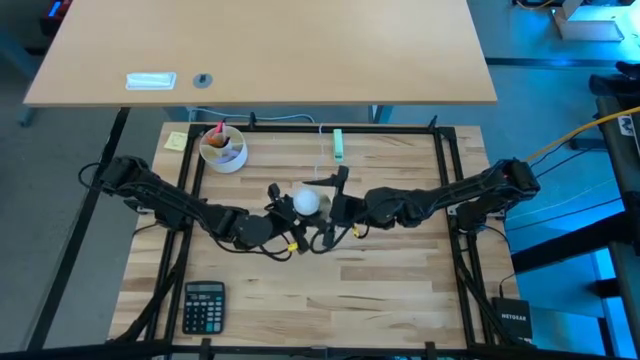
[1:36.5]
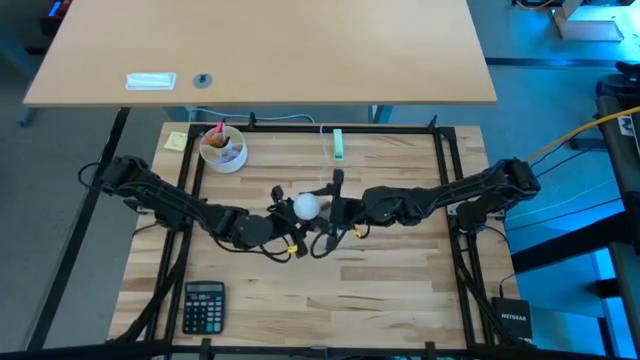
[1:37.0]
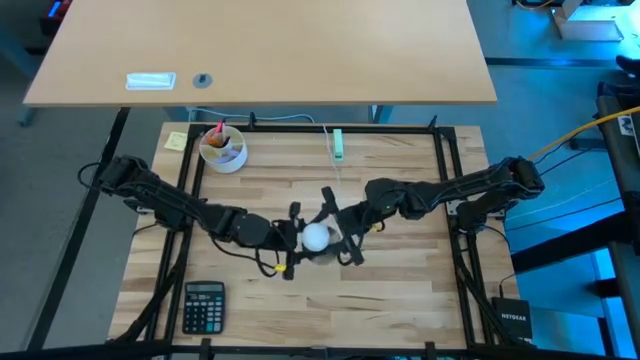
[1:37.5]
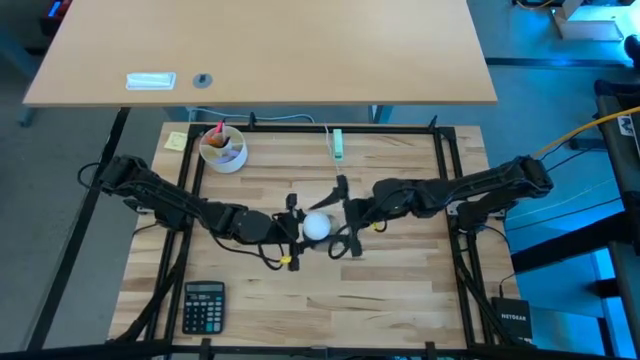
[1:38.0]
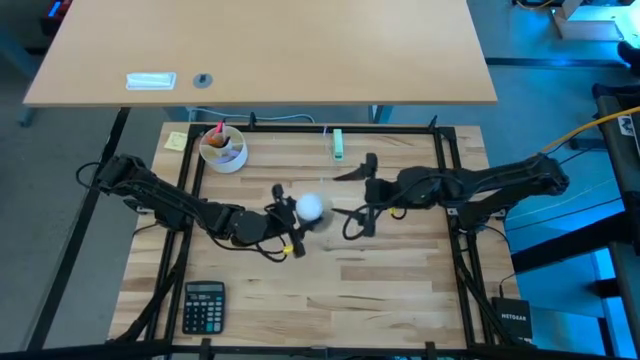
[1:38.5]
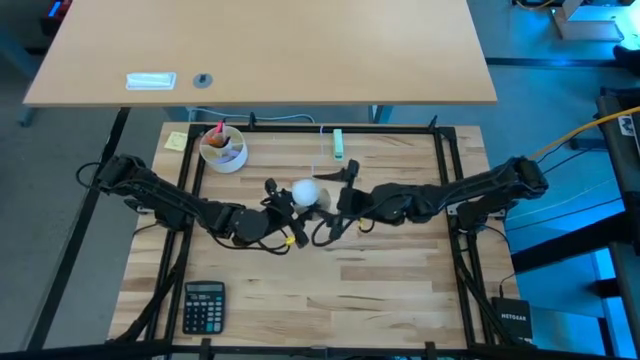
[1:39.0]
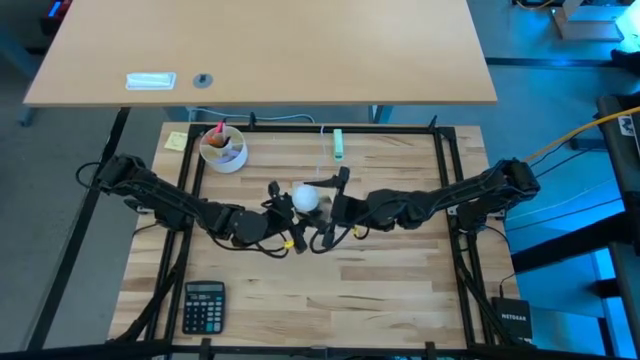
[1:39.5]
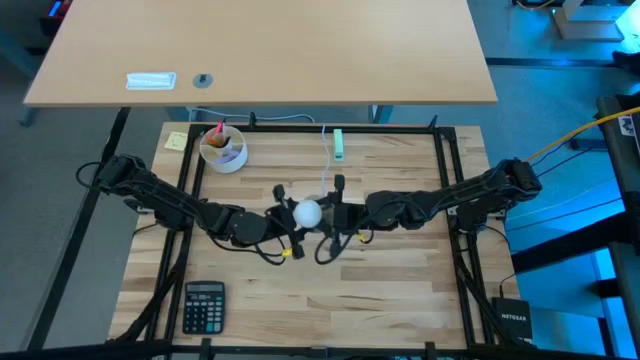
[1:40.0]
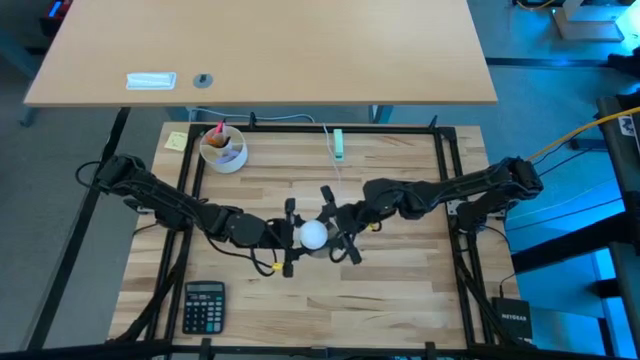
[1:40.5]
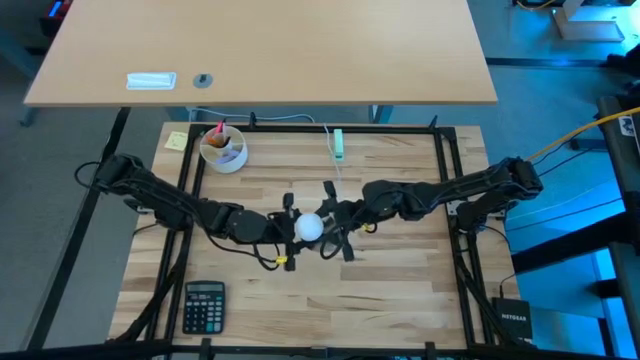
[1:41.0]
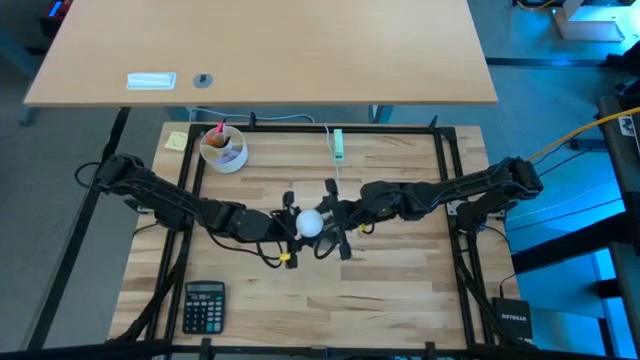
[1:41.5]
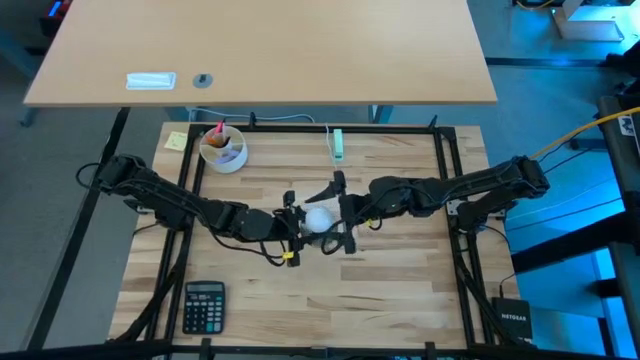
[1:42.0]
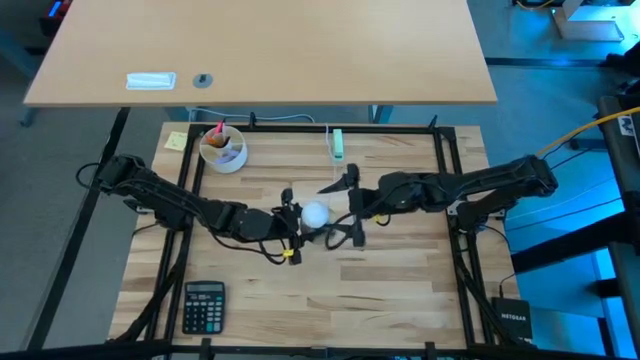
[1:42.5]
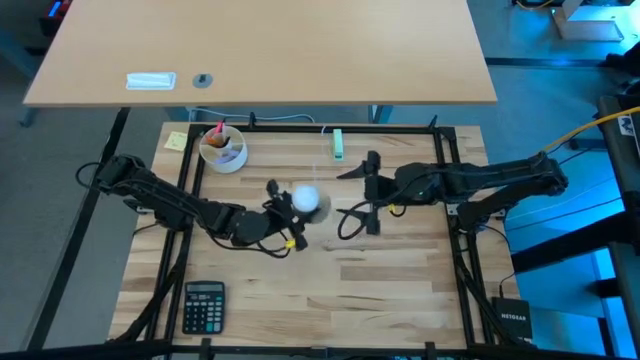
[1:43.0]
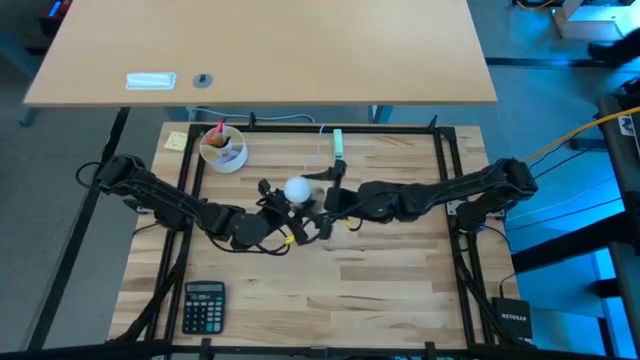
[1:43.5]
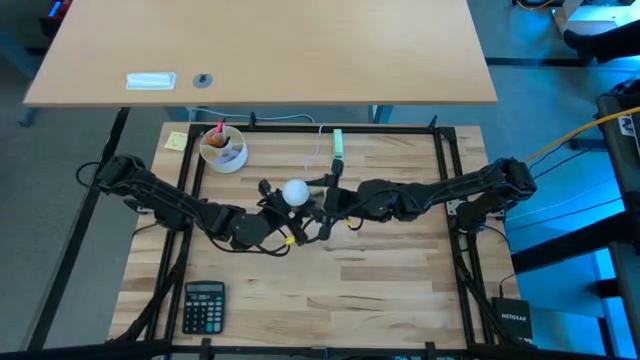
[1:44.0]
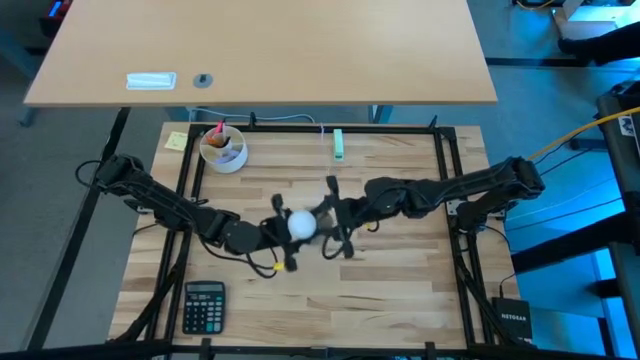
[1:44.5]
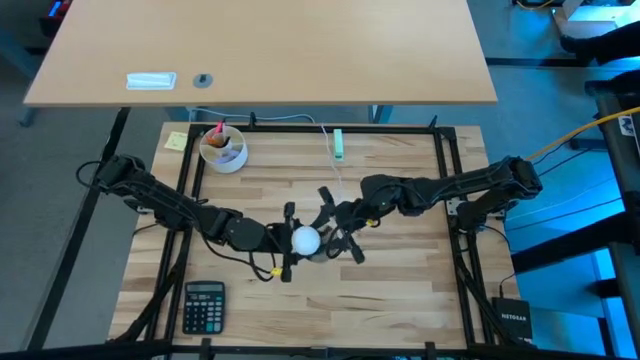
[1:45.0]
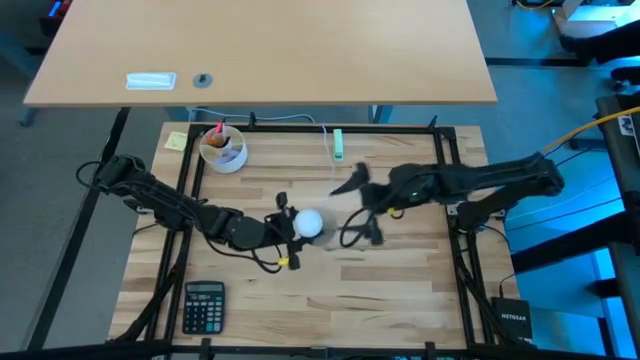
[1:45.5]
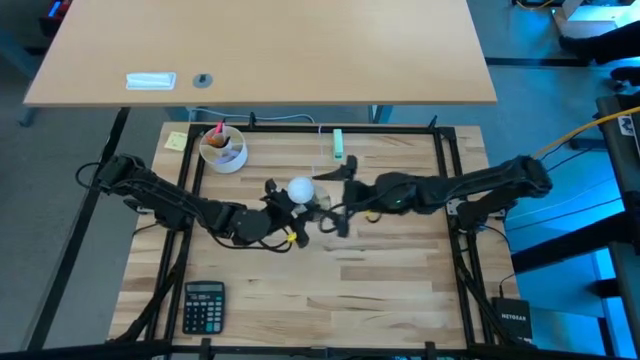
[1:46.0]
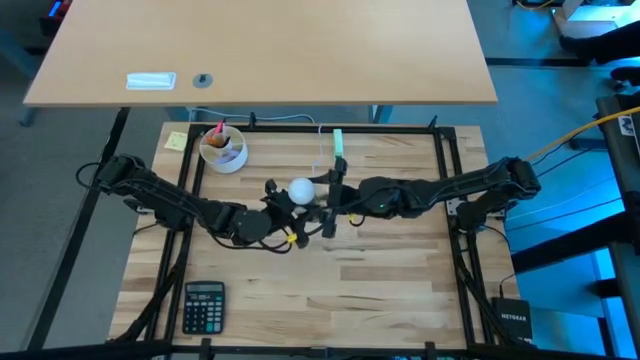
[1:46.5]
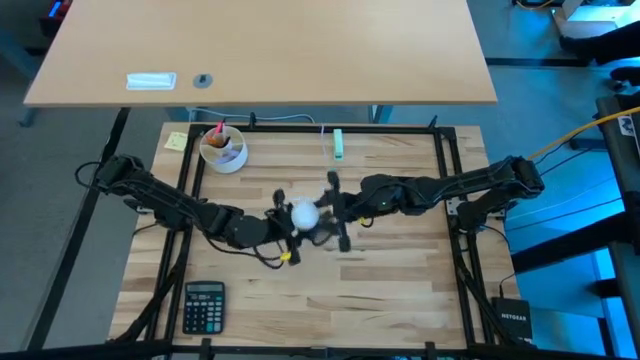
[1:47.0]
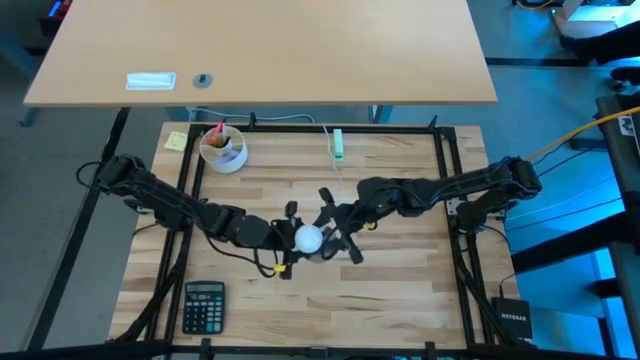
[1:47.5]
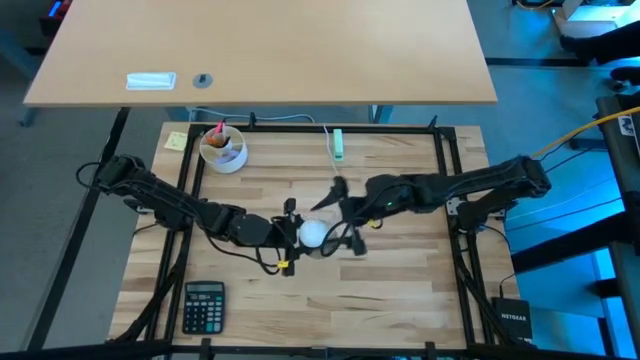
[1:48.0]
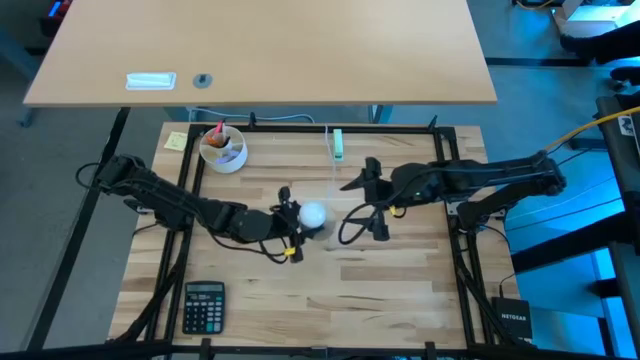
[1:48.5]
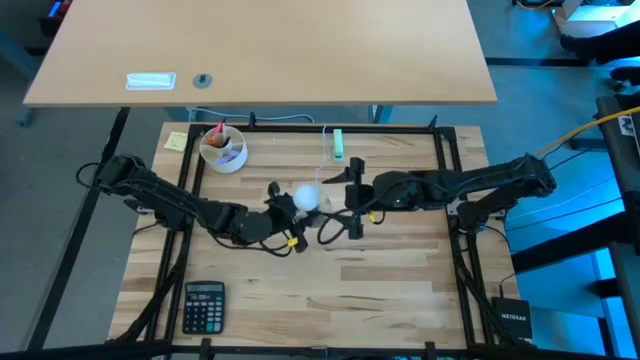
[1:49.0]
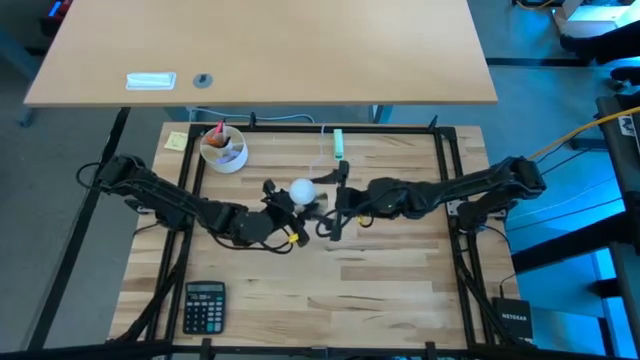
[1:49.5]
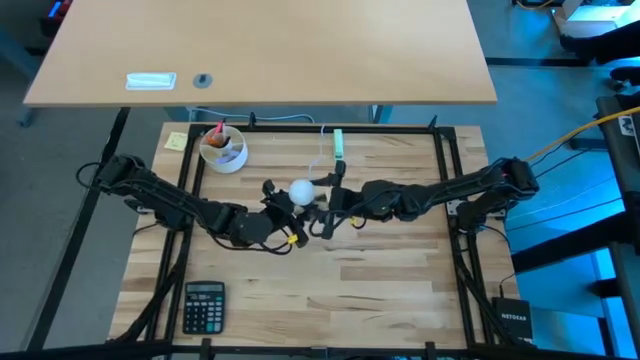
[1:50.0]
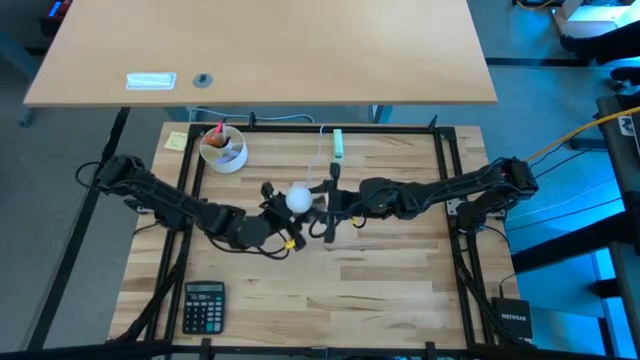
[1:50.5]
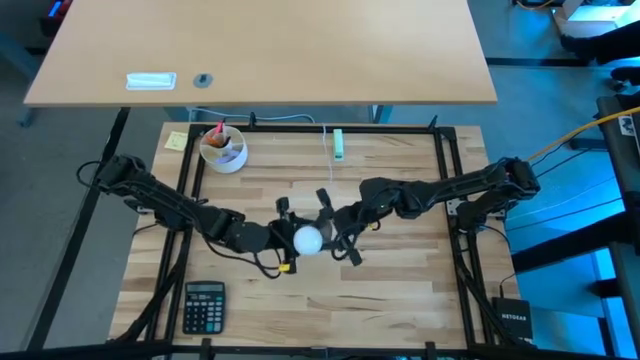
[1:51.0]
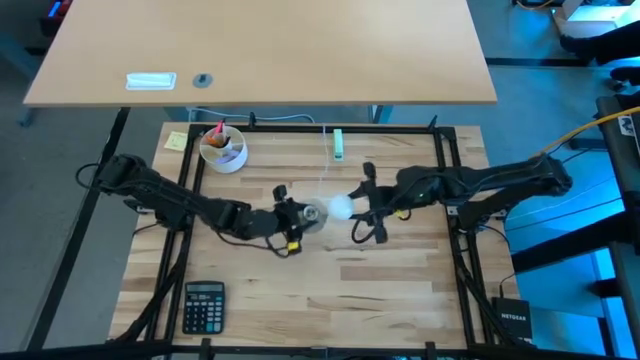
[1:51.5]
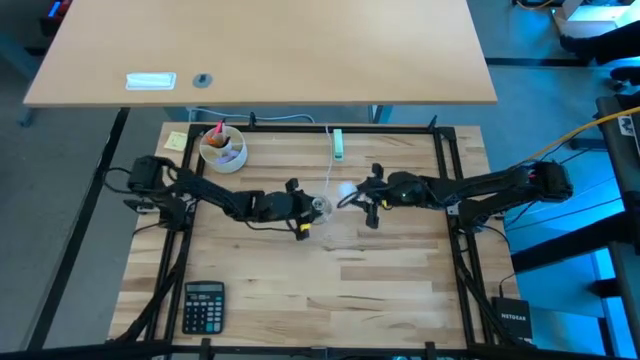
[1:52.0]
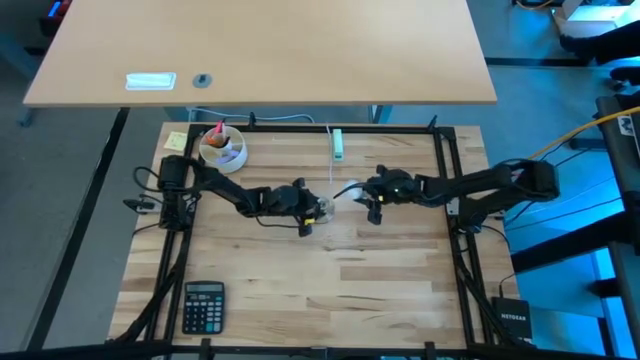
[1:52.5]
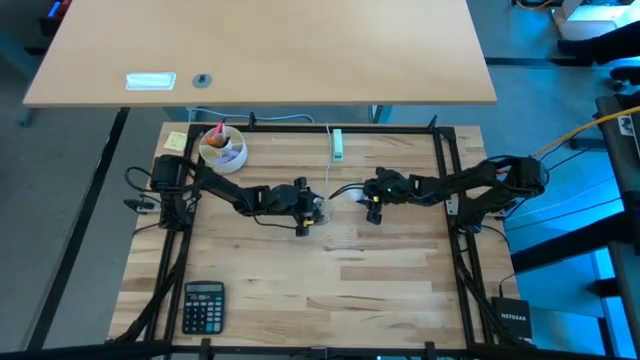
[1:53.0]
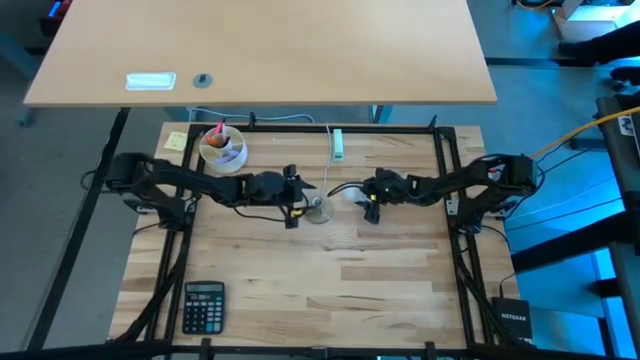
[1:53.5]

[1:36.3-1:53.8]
Task: Screw lightbulb
Remove the lightbulb from the lamp socket

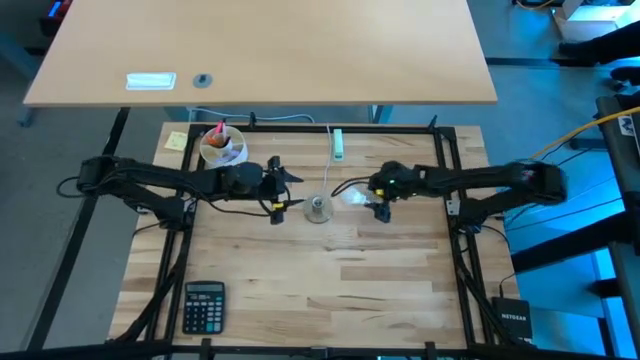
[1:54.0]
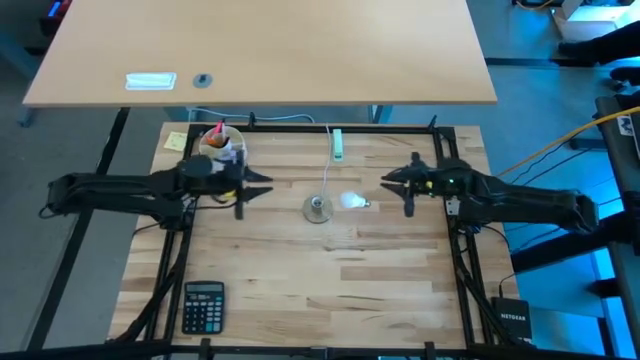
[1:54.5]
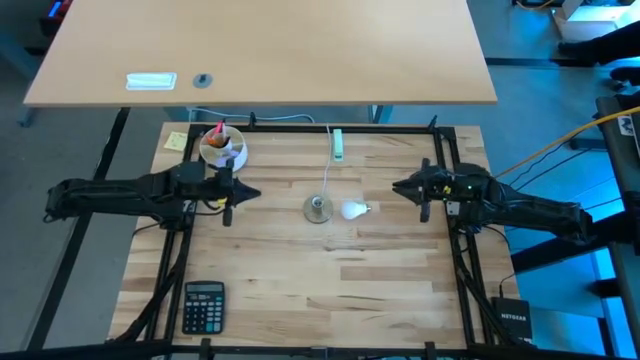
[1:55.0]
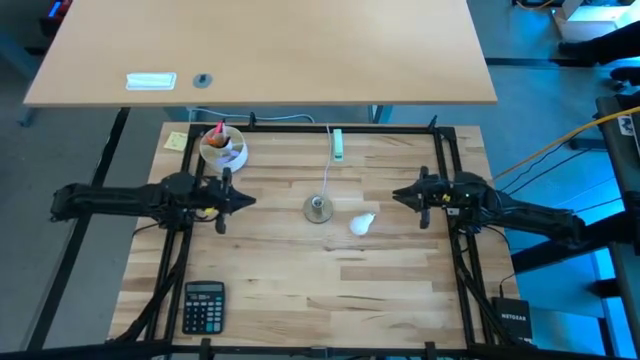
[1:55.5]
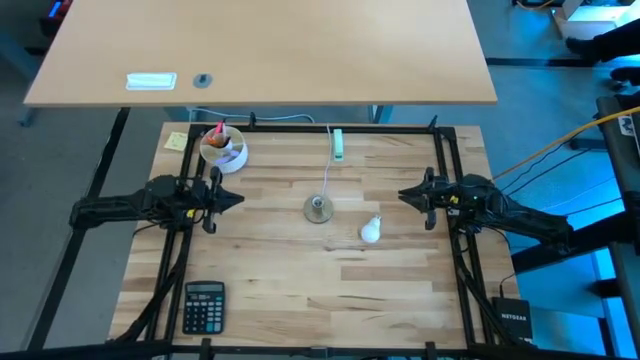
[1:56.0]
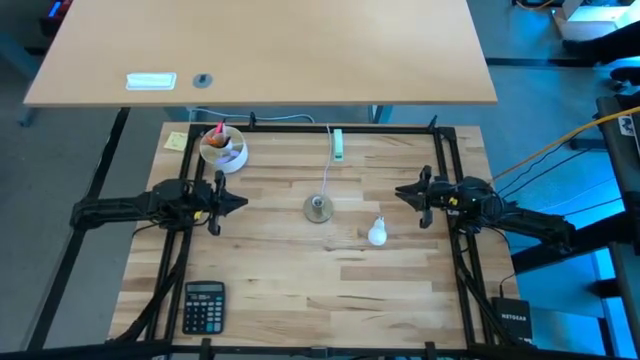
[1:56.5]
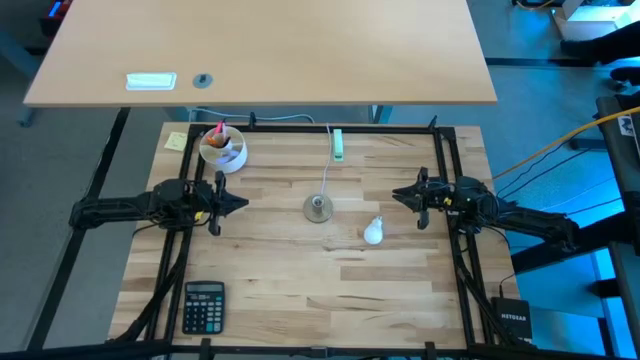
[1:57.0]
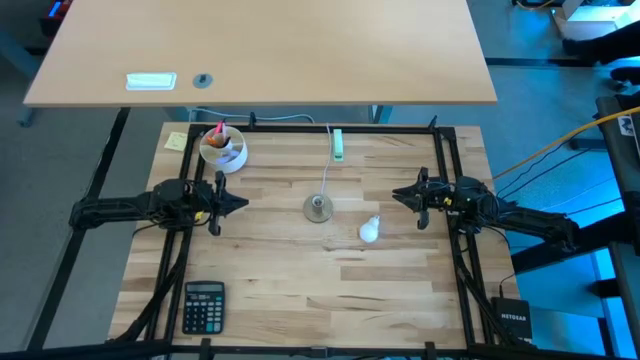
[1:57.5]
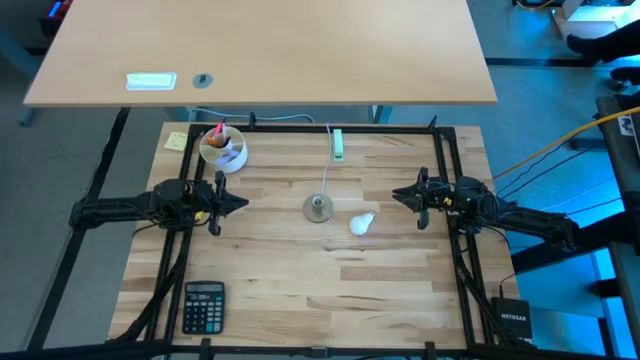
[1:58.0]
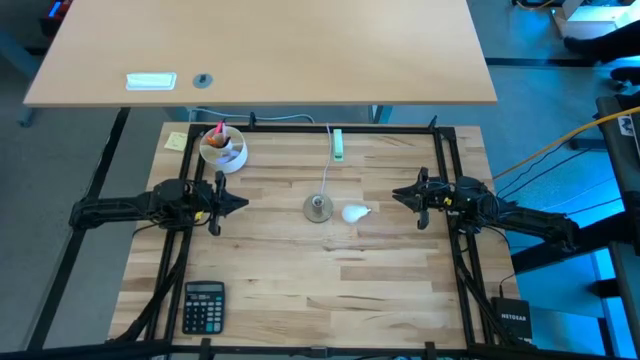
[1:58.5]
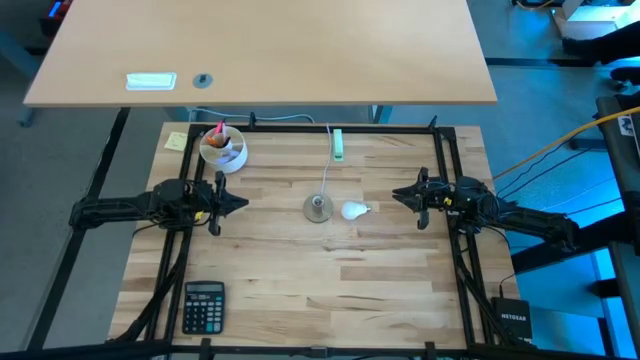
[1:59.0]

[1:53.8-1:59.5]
Return to Home Position
